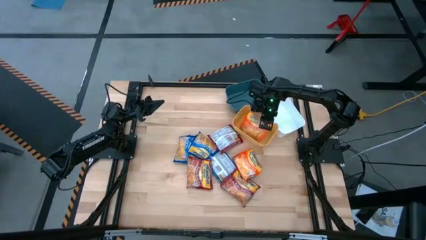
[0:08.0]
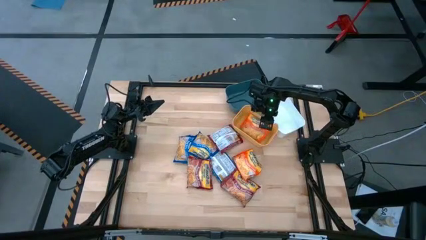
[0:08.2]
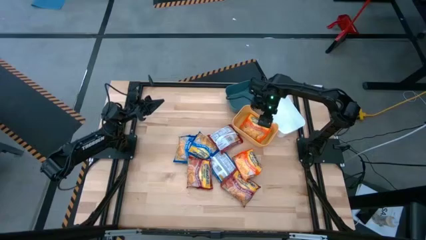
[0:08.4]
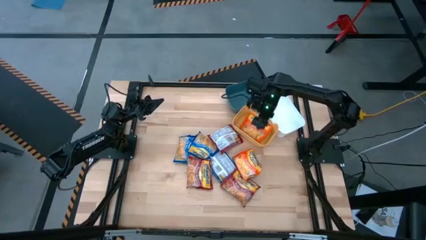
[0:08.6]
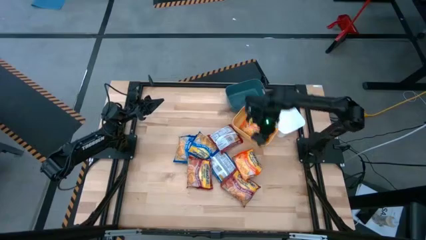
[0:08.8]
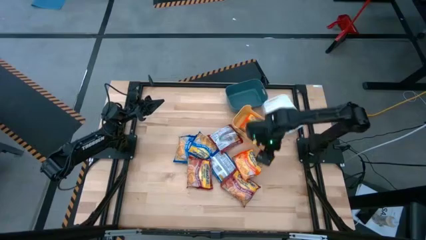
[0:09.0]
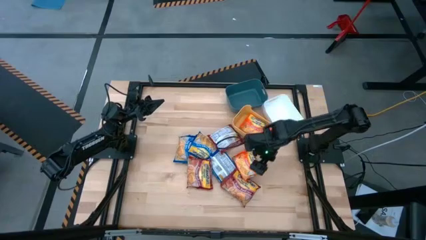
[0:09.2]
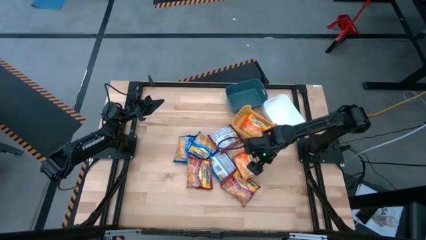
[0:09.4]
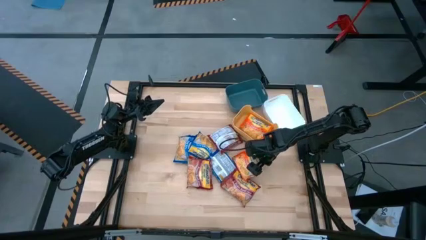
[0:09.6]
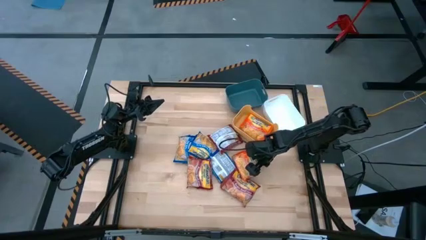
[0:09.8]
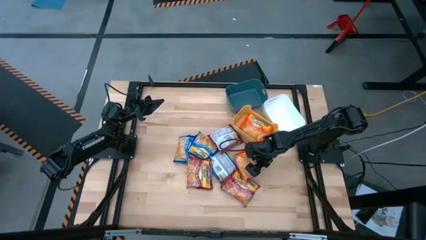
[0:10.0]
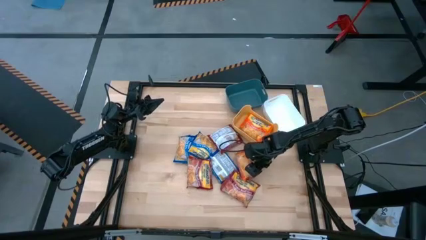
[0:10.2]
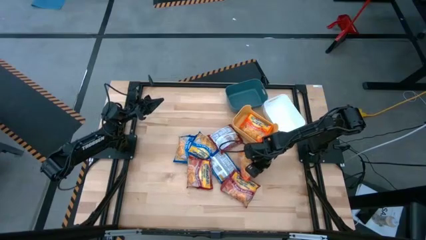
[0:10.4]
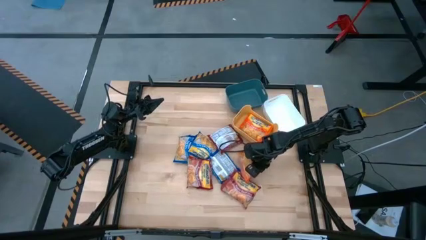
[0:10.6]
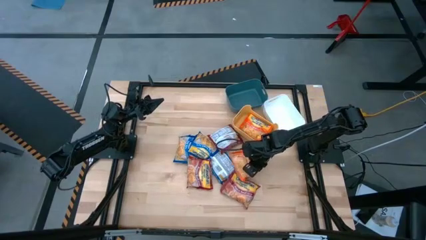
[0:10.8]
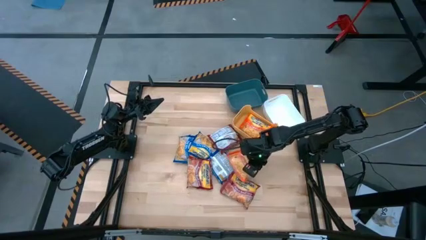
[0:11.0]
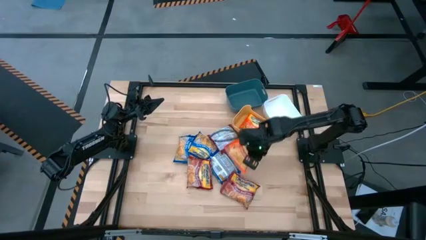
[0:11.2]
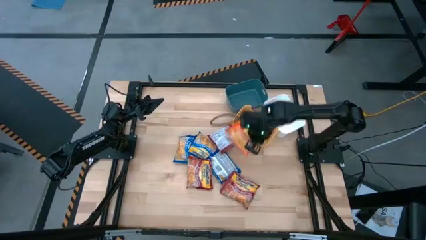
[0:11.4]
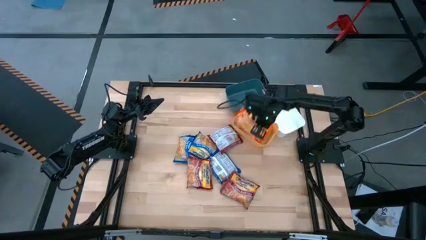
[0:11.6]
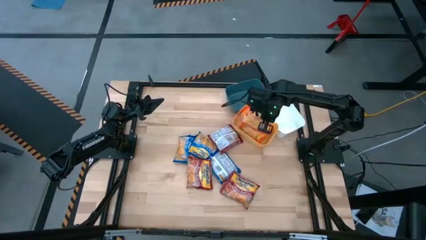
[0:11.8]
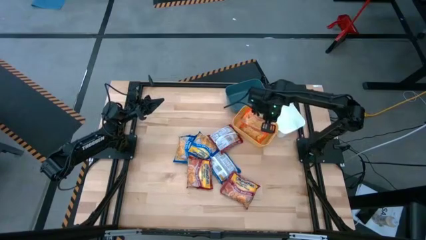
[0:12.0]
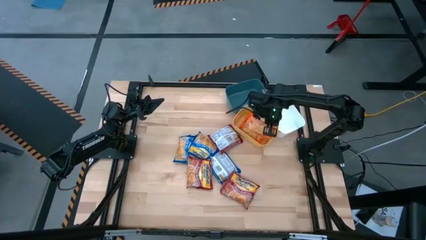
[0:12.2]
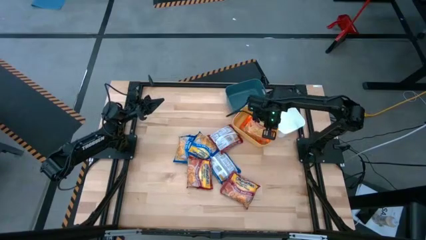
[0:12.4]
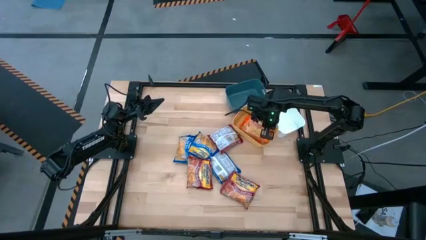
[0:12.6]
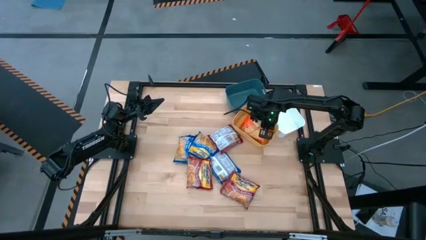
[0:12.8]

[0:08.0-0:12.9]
Task: Sort Maruchan noodles
Put the orange noodle pack into the yellow bin

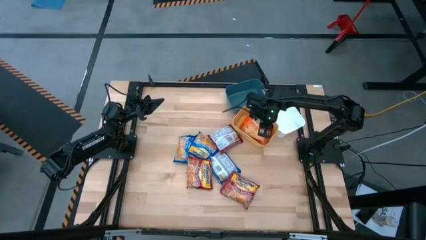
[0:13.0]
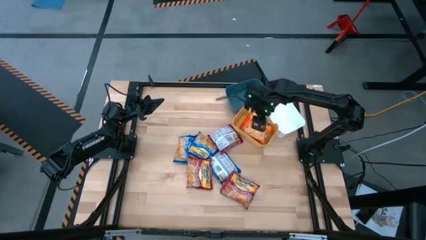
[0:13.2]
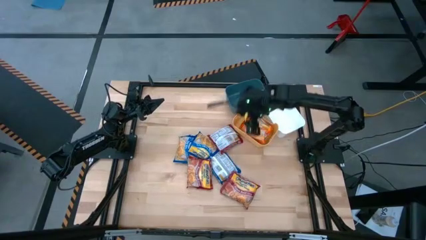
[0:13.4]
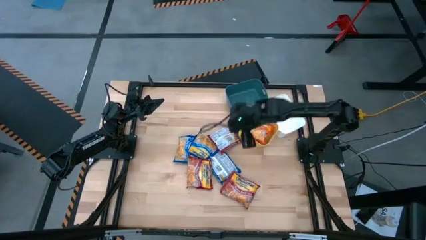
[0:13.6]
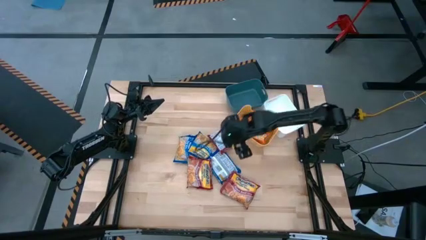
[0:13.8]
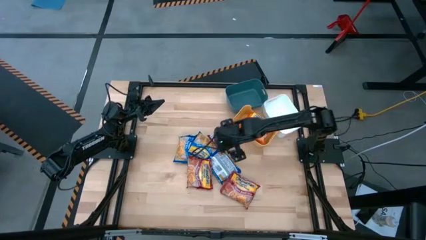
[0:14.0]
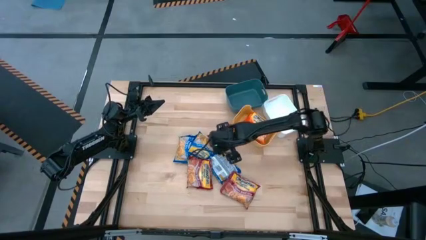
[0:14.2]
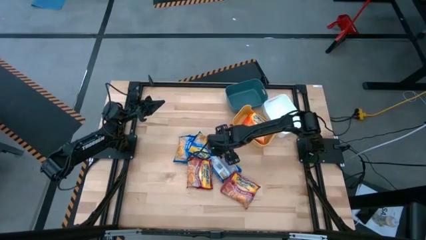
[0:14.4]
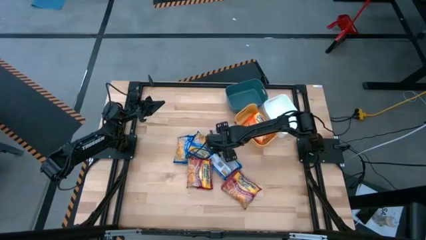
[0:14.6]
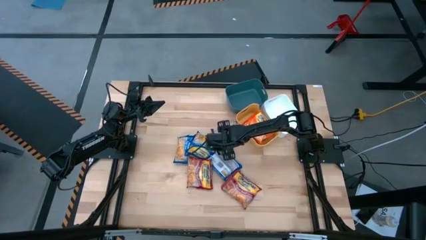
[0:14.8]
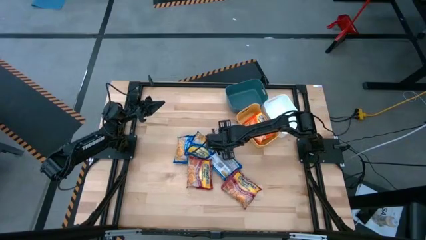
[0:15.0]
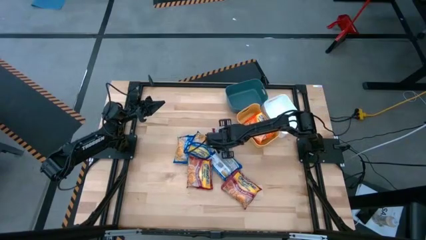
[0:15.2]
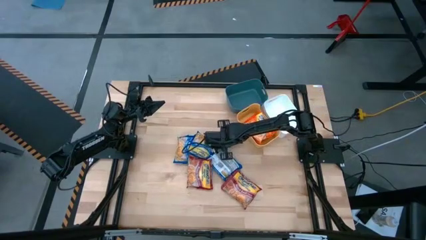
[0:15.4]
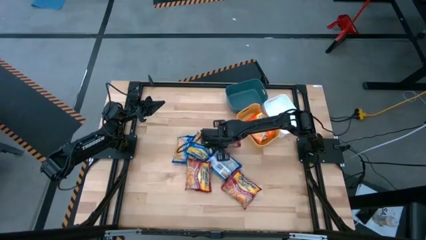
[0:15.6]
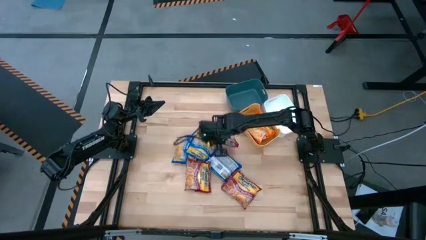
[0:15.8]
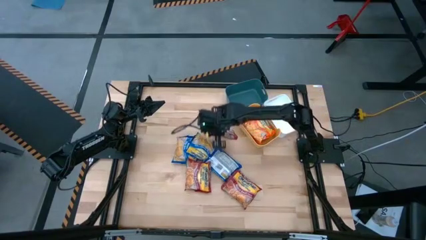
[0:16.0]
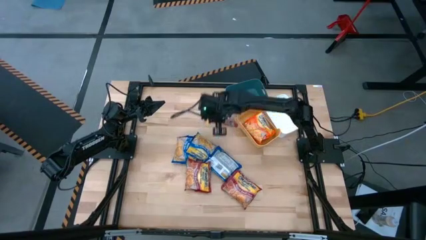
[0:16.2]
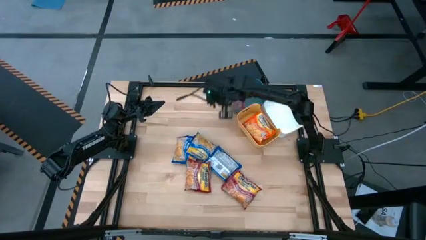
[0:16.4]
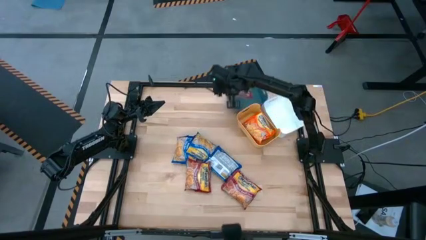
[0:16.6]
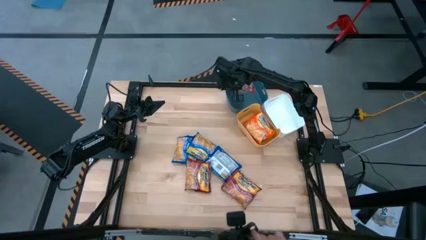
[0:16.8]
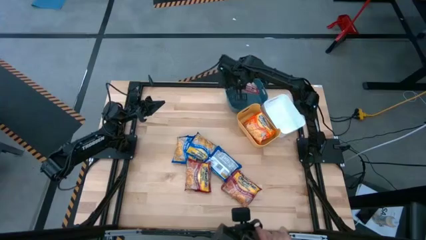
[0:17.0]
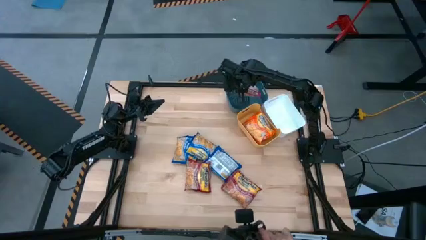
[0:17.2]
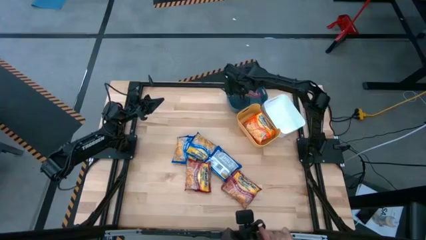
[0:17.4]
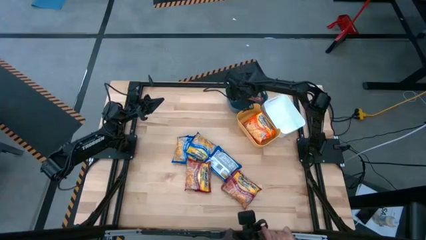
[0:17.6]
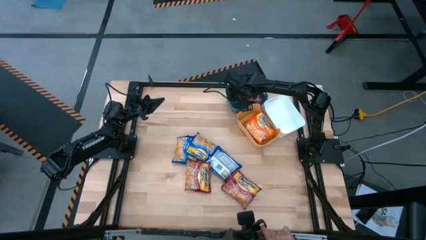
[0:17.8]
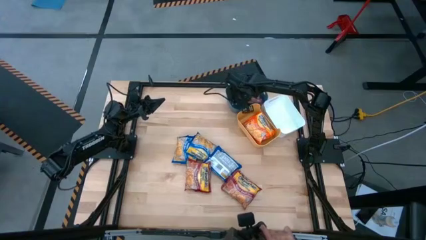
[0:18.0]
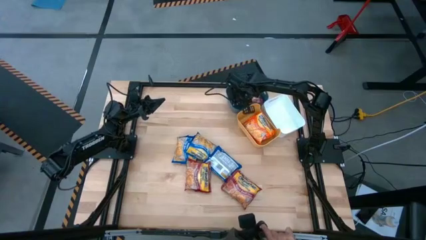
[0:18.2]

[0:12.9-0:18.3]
Put the top red noodle pack into the blue bin

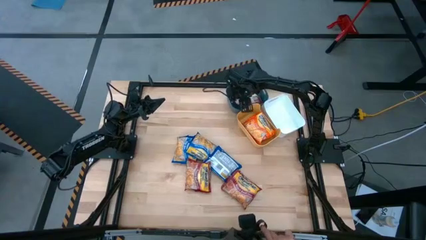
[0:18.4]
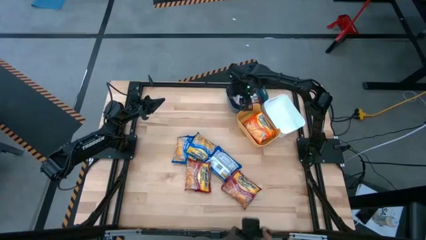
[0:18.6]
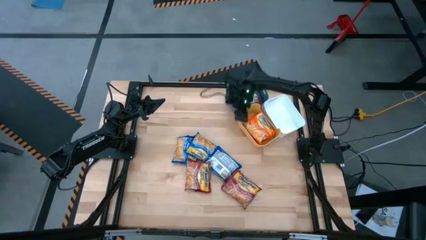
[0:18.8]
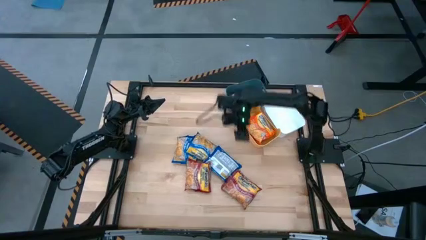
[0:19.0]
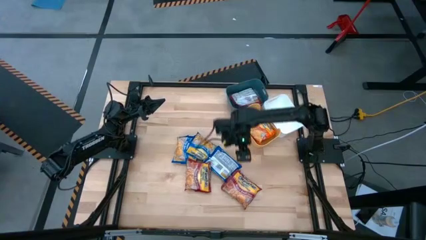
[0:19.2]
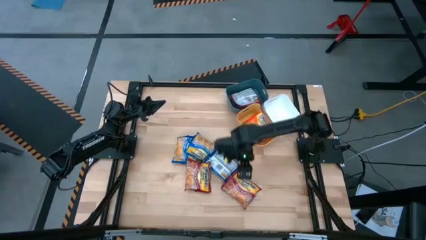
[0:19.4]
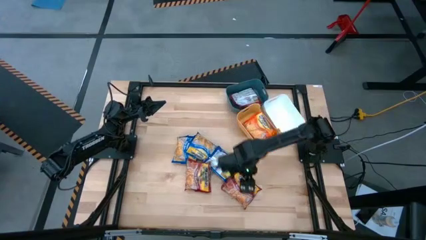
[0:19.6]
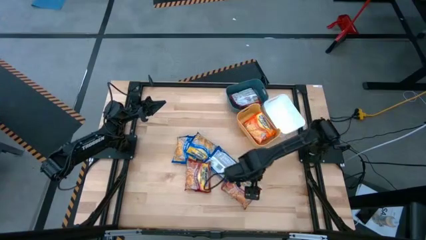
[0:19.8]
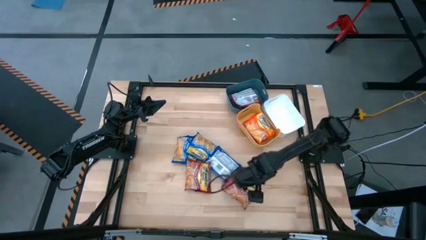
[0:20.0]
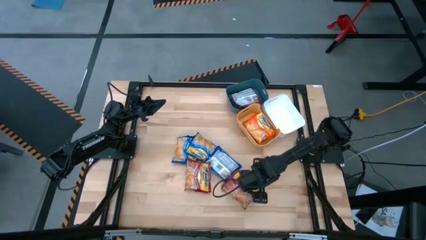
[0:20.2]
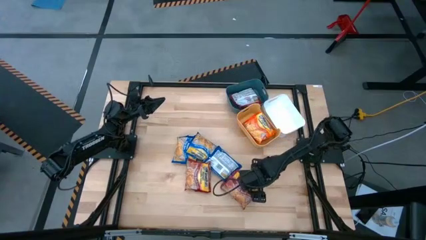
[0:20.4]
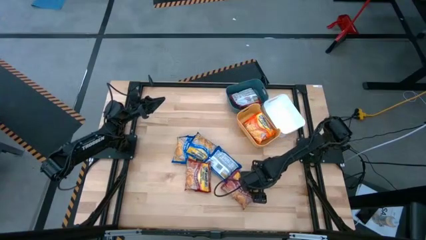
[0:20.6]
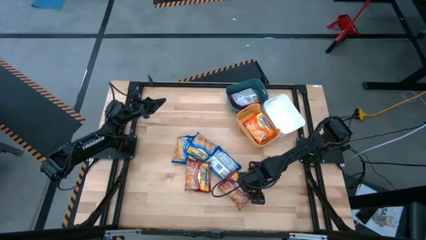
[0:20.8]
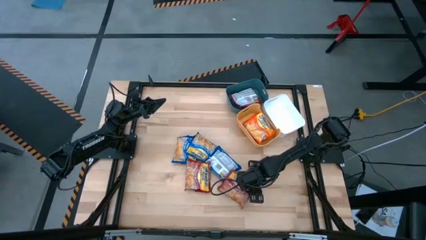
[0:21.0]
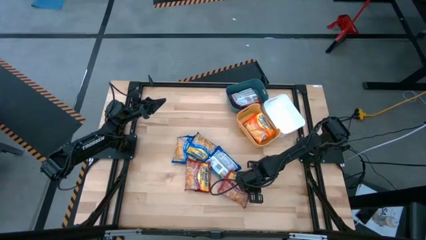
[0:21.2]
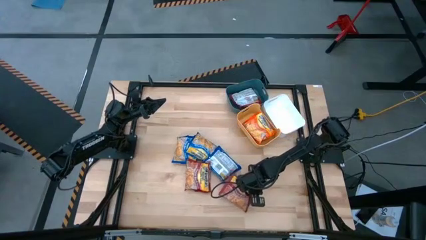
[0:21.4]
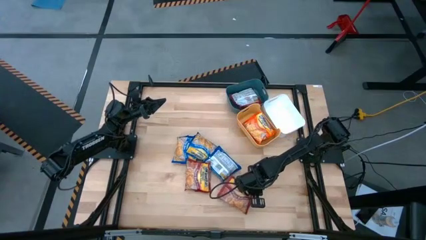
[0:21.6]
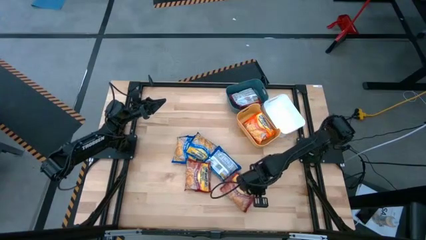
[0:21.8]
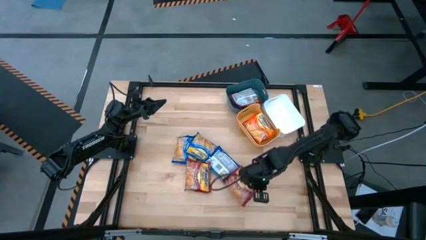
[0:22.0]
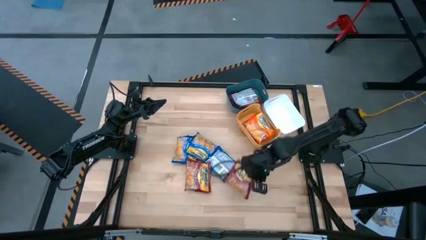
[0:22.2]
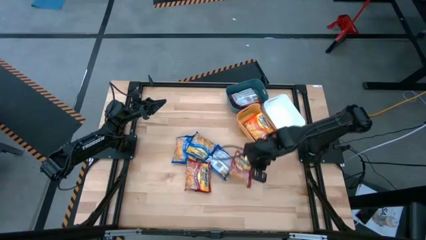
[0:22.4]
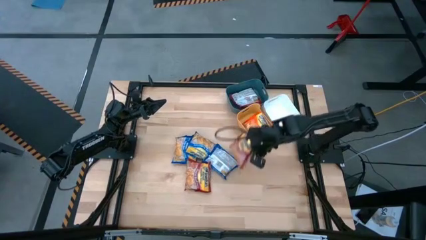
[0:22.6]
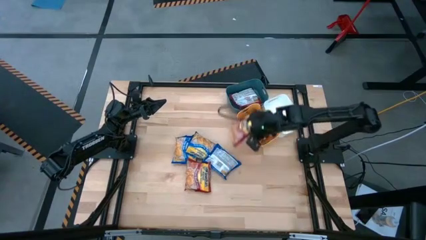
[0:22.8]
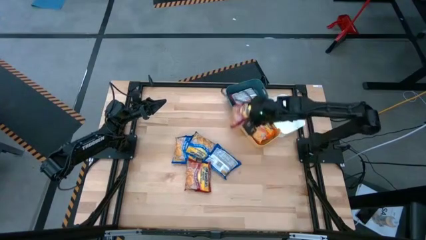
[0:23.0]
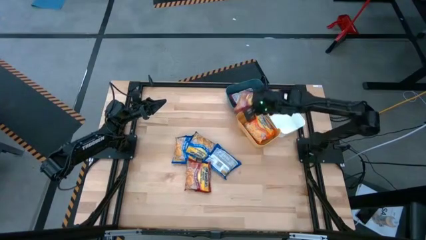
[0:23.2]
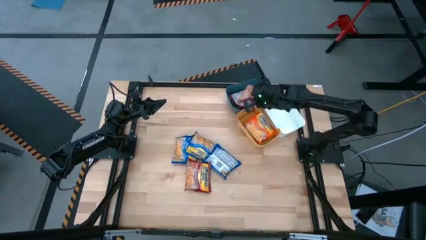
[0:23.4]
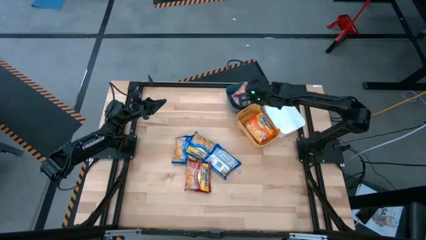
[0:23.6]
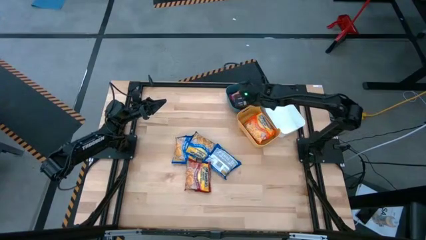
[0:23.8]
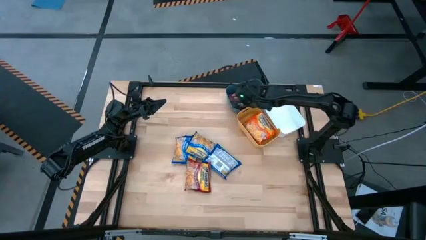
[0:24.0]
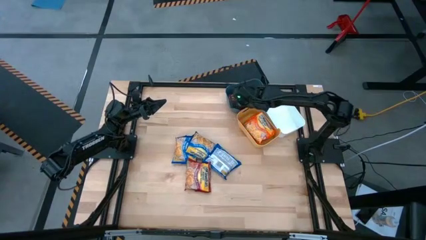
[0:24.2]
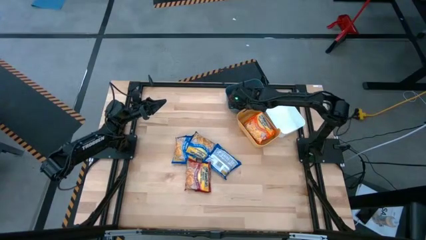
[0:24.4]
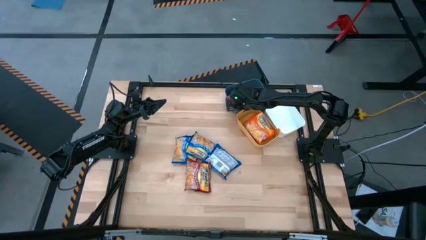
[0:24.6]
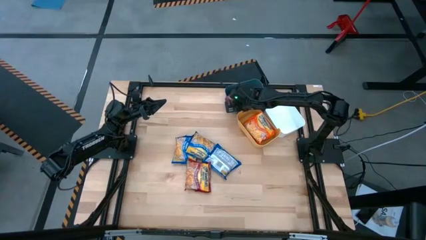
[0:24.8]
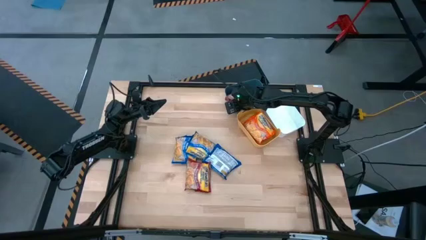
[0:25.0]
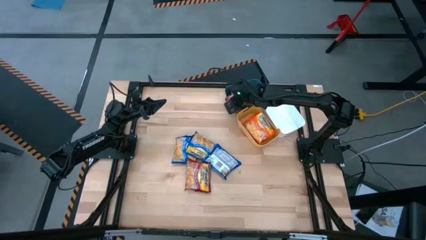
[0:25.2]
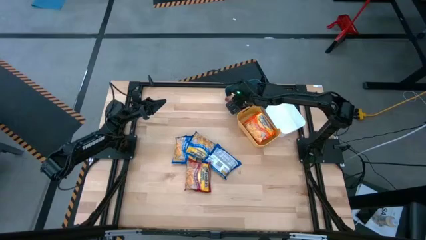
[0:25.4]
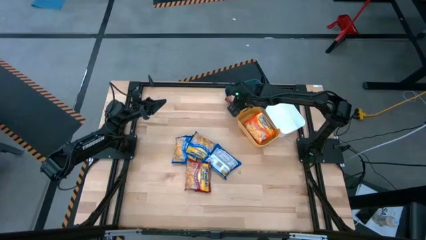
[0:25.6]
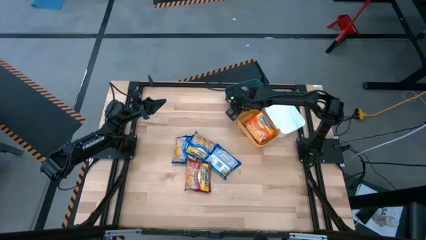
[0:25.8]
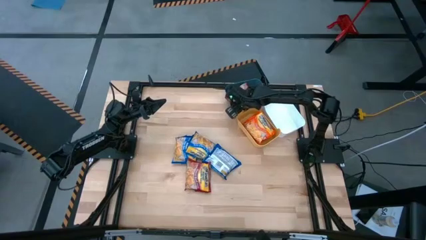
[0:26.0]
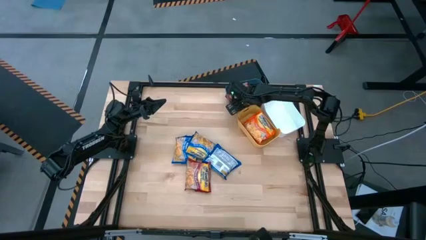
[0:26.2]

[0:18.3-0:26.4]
Put the right red noodle pack into the blue bin
